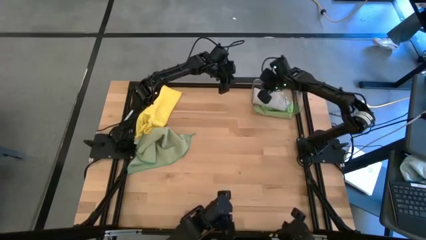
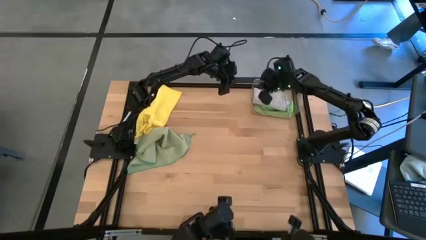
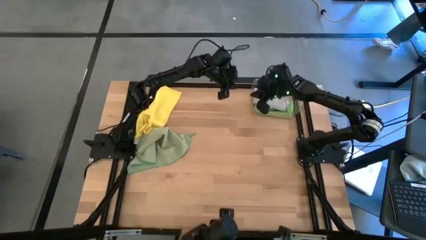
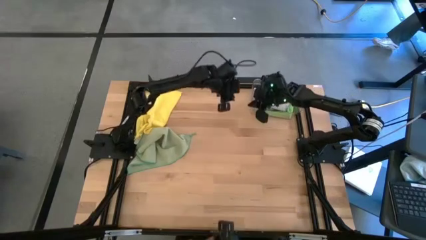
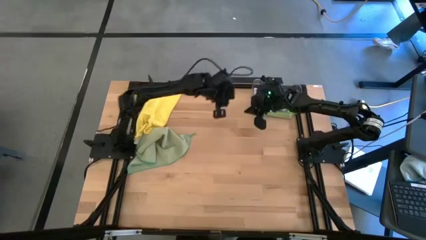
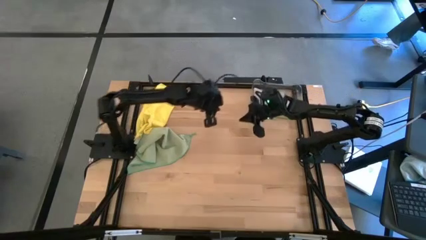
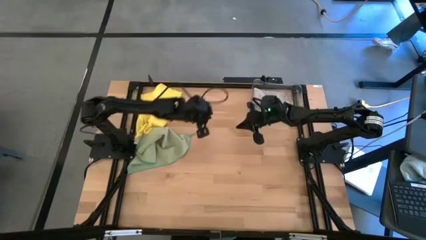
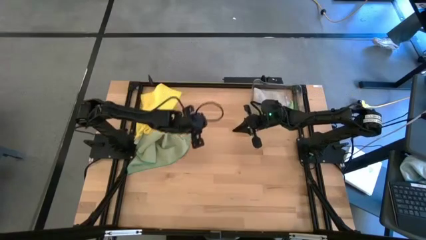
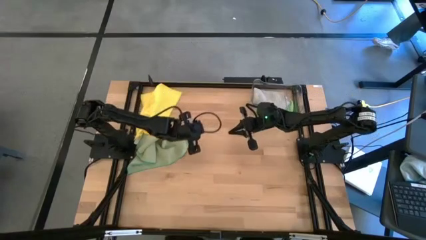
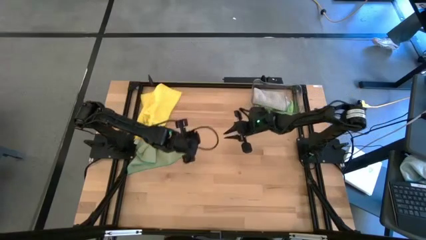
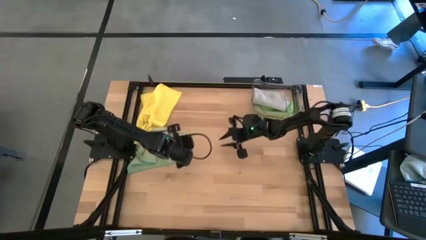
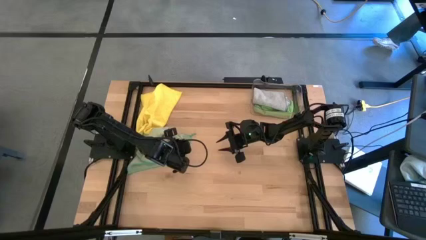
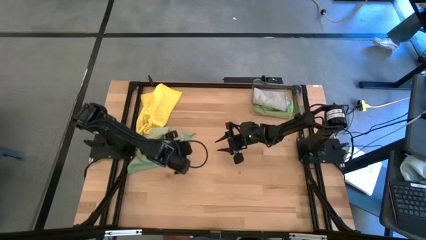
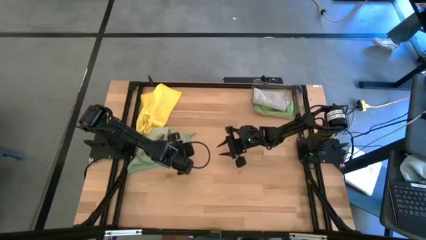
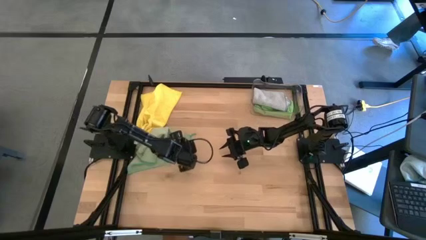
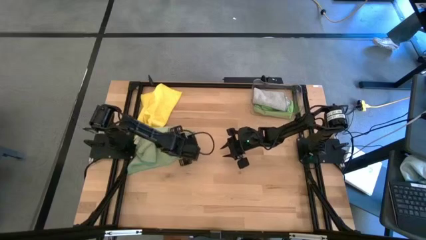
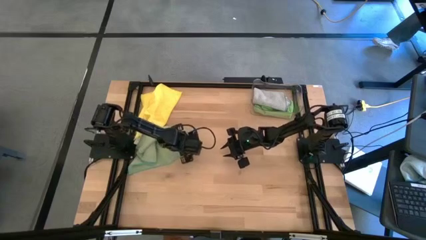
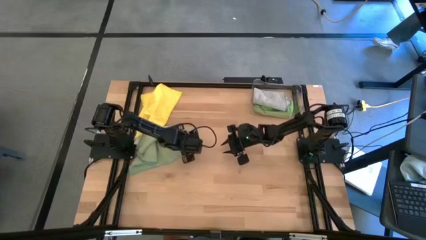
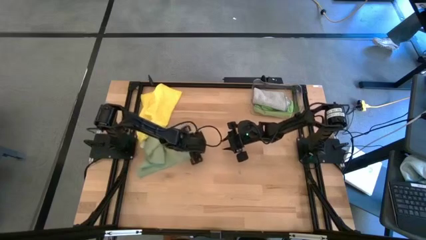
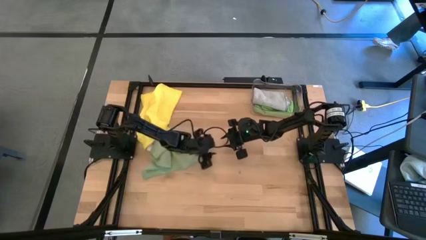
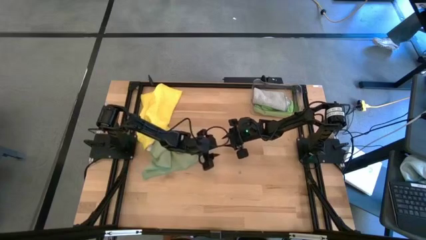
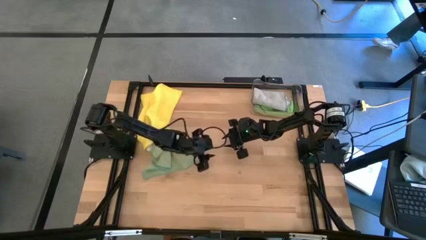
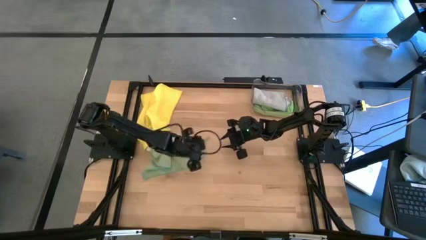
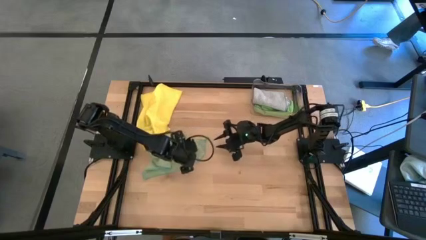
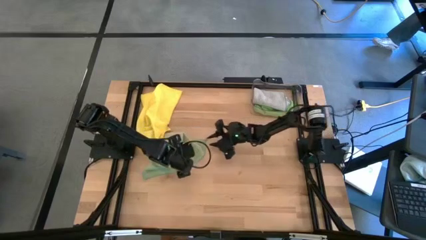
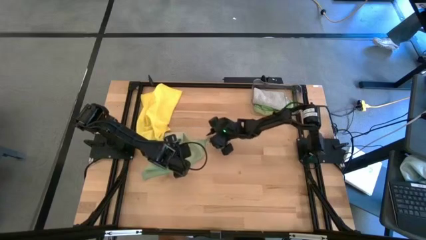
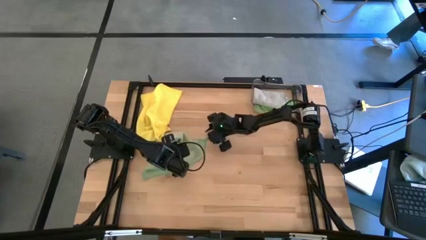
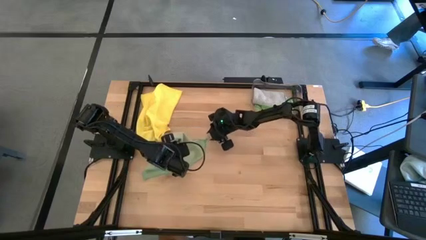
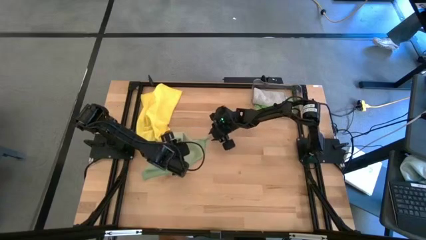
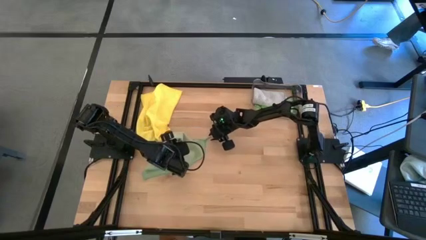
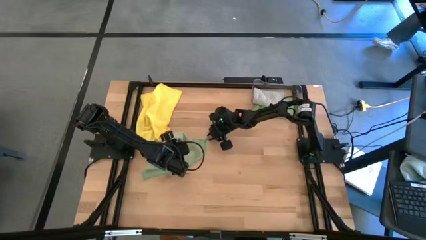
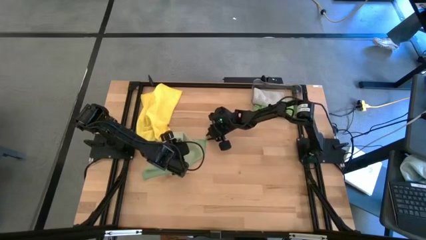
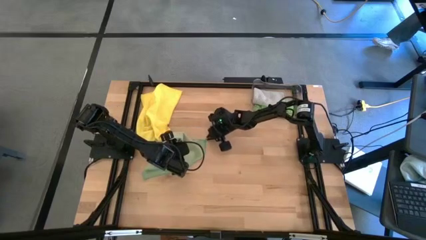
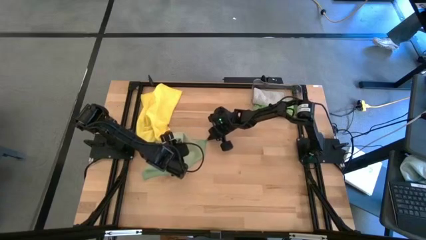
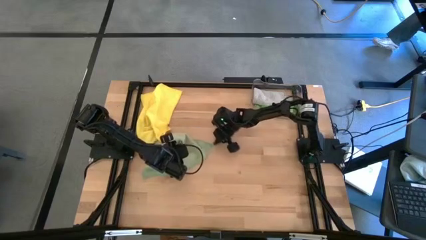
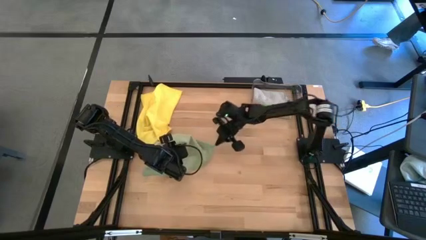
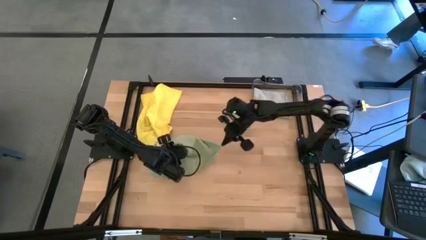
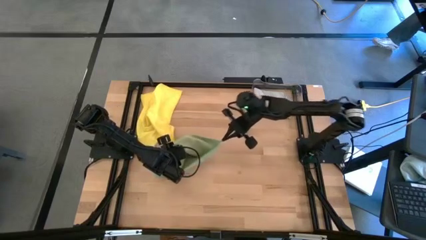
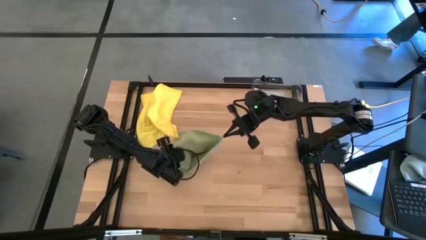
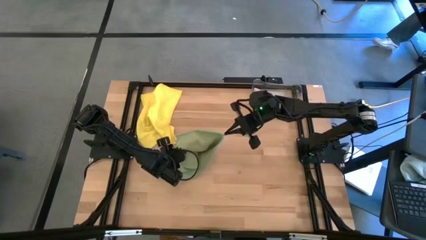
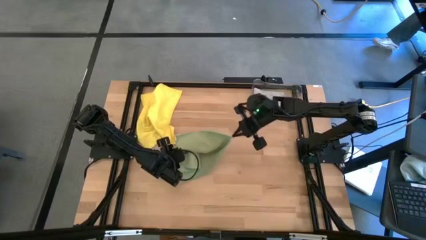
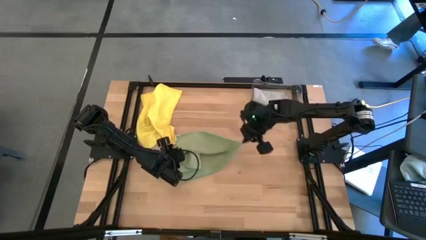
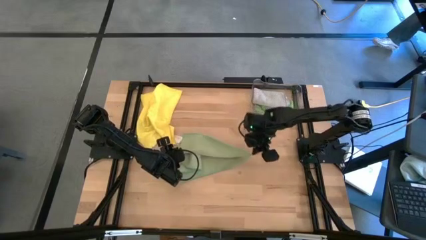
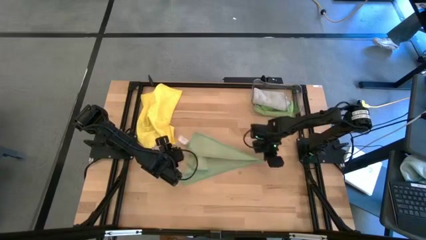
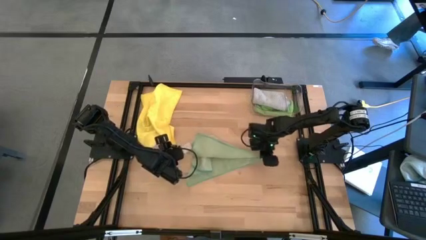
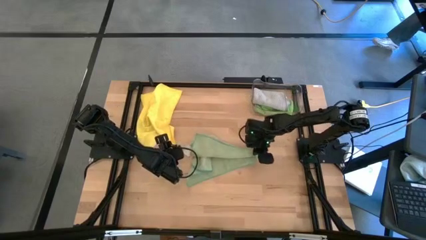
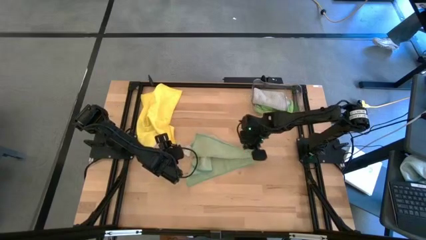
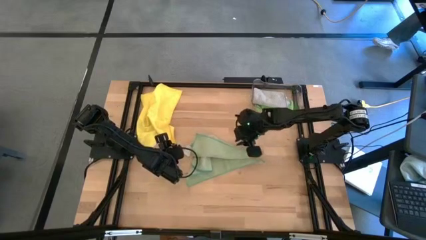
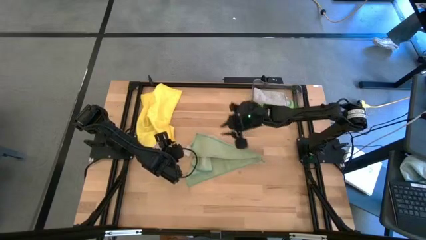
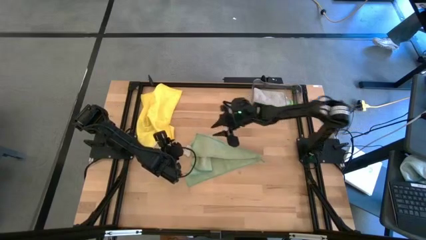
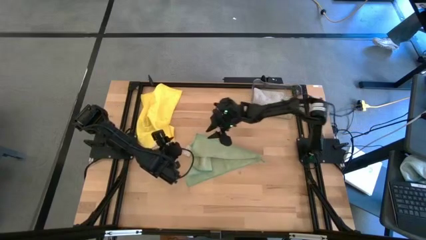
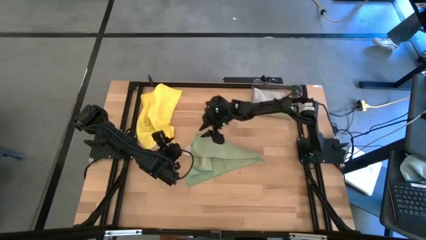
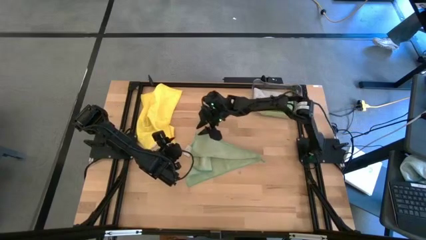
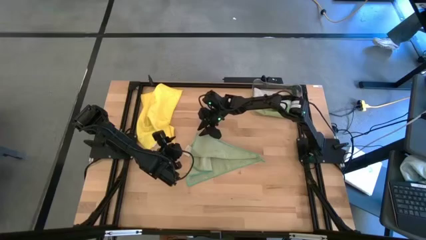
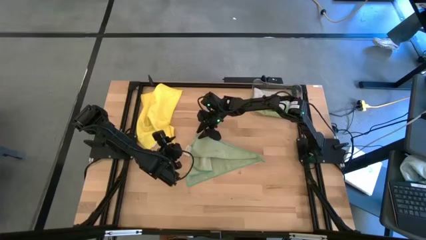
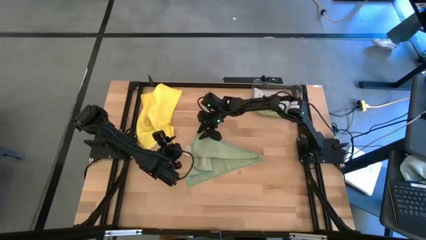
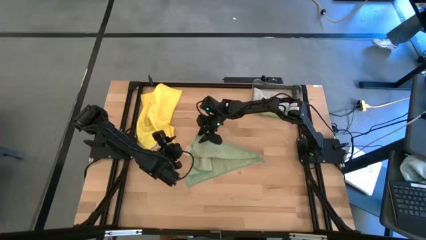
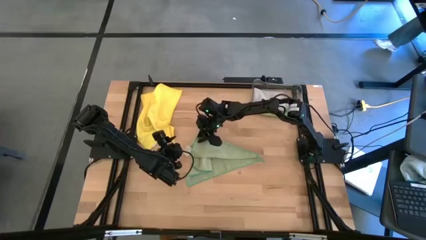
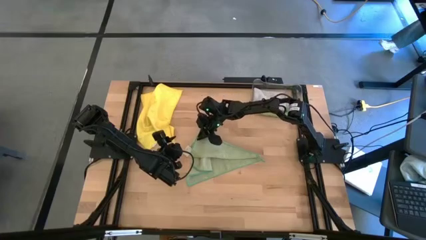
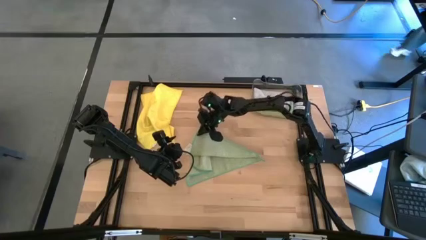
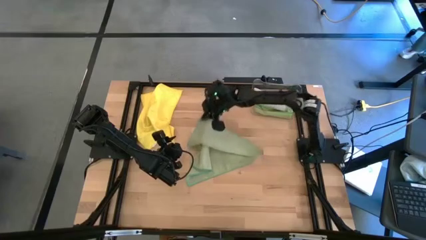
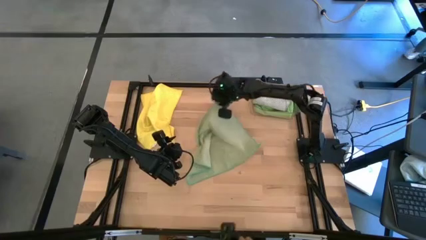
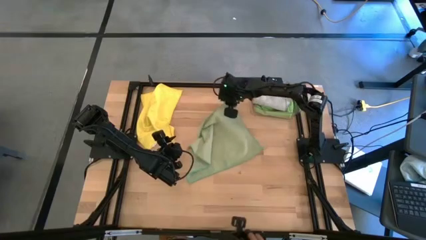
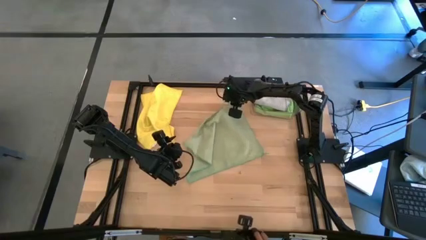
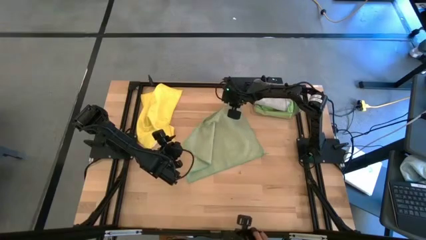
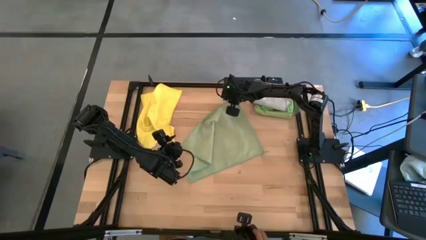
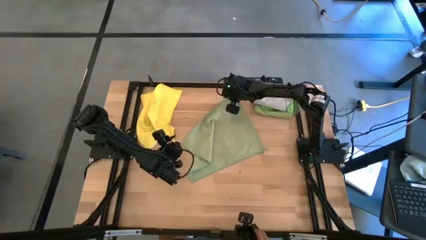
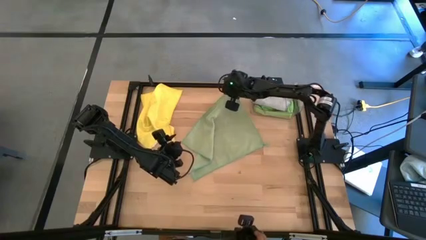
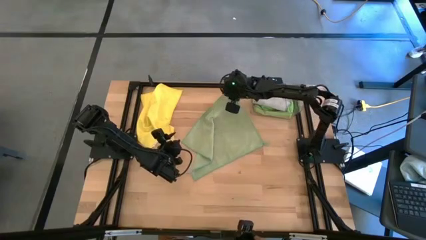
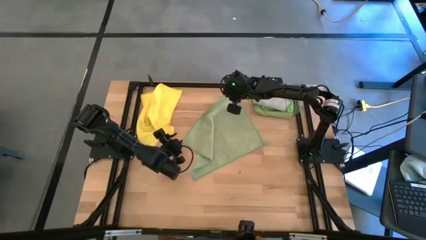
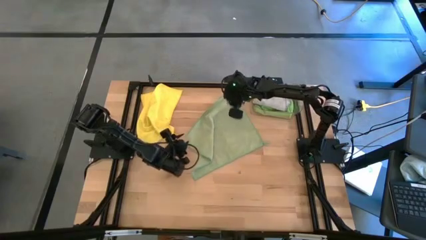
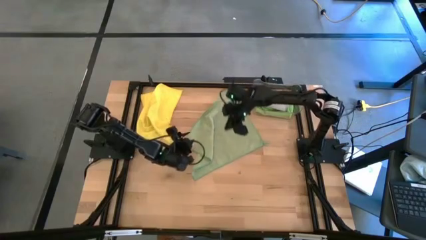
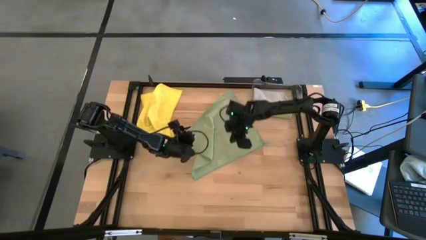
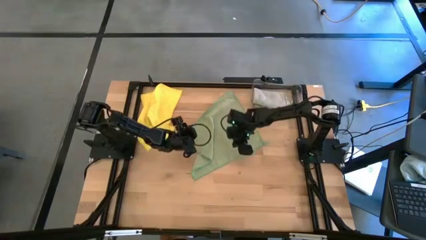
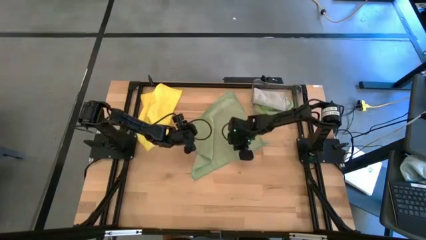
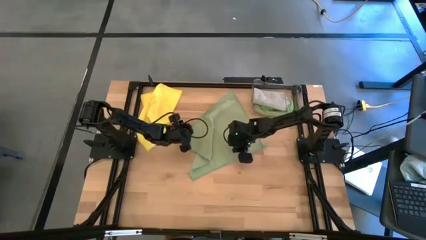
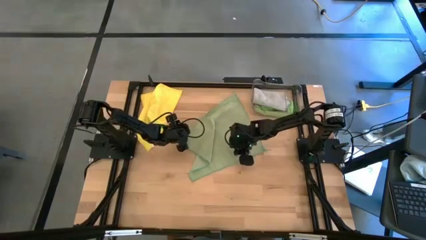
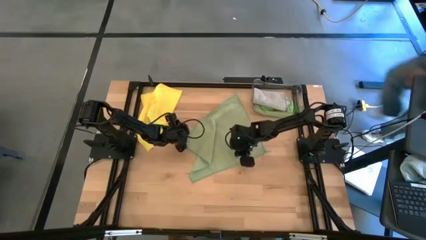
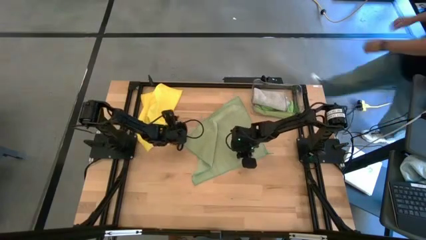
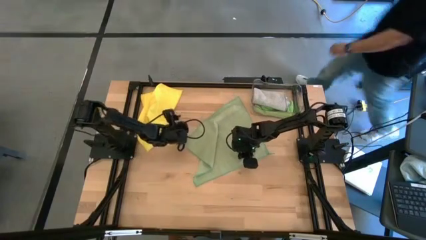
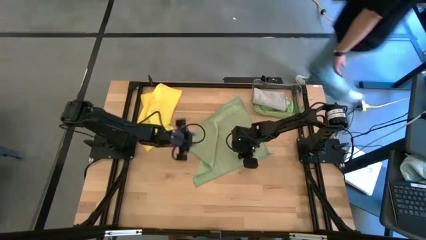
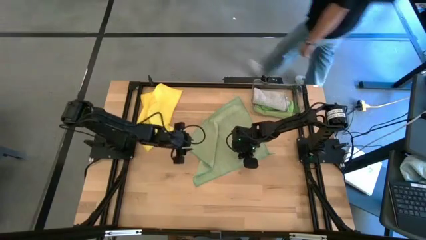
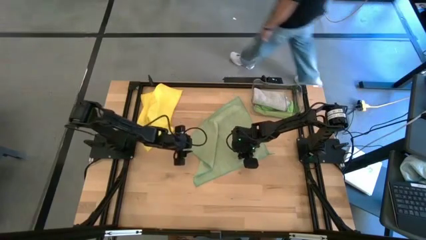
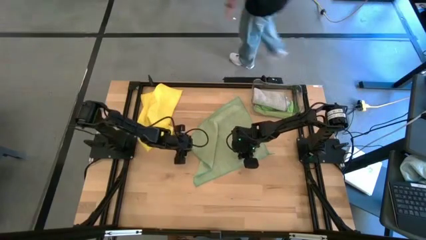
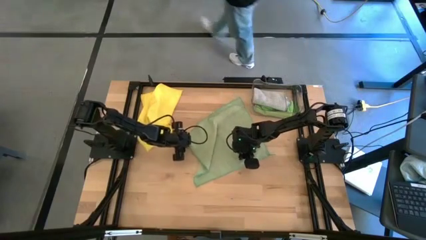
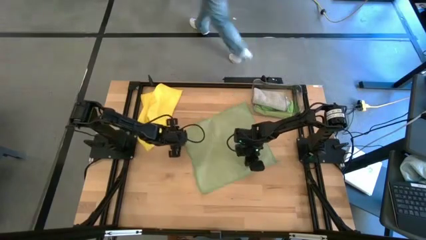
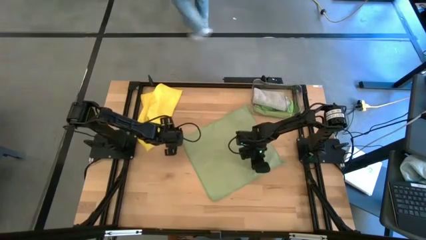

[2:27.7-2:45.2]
Task: Fold microfiber towels
Fold the light green cloth

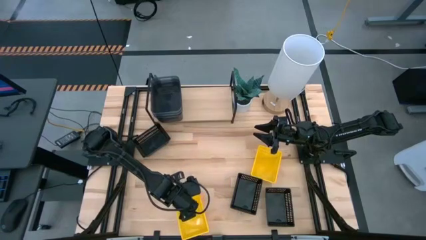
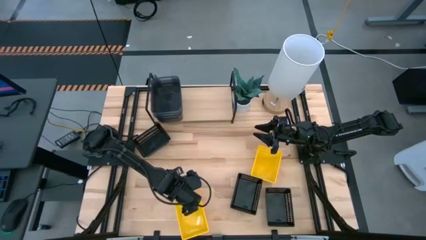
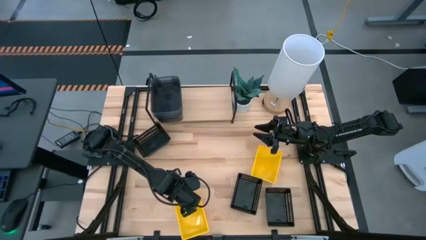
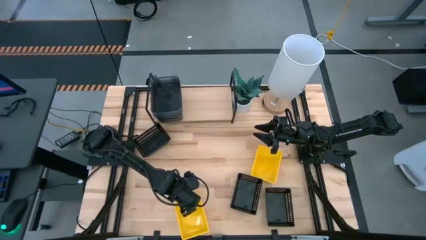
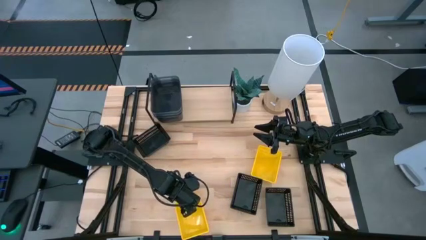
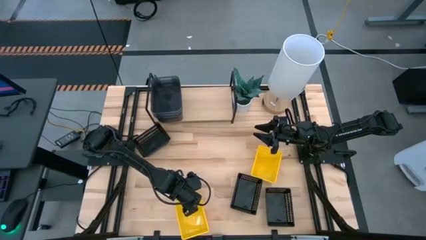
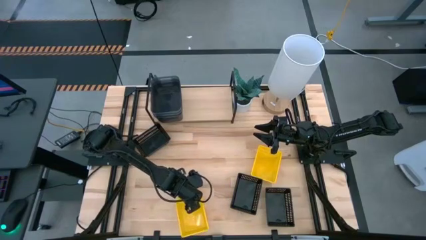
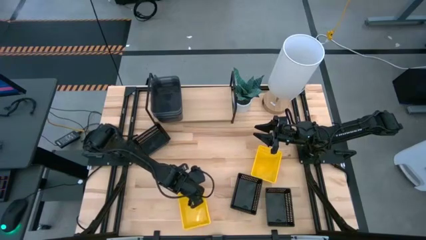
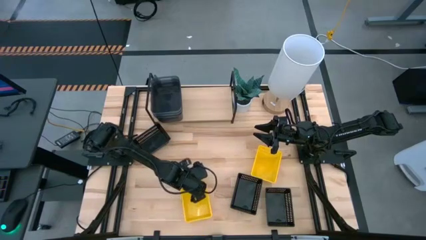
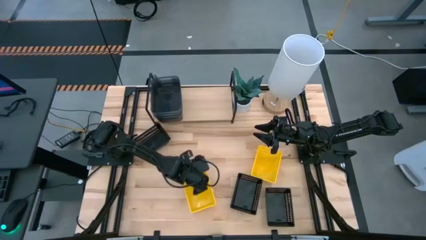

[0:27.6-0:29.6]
Task: Stack baskets on shelf by color
Adjust the stacked bins
